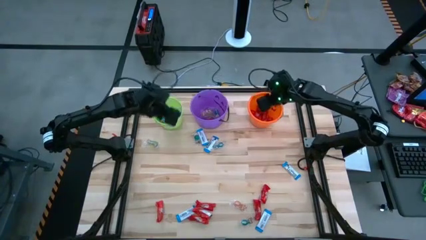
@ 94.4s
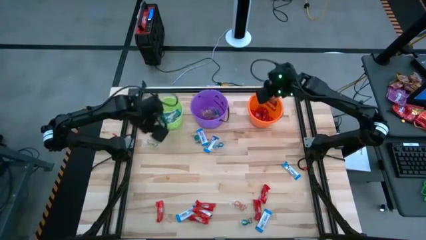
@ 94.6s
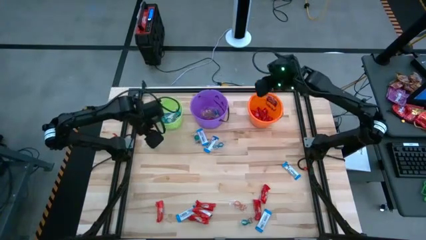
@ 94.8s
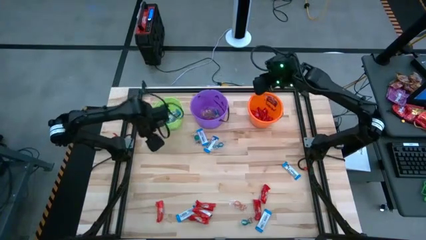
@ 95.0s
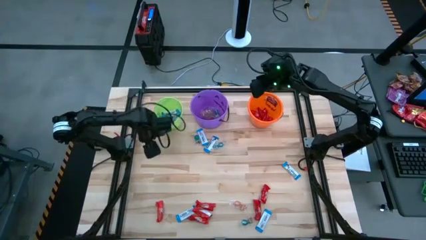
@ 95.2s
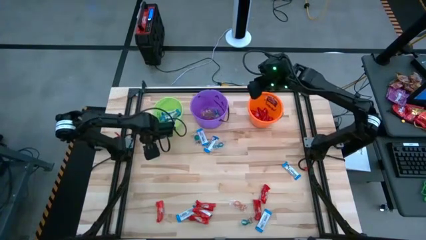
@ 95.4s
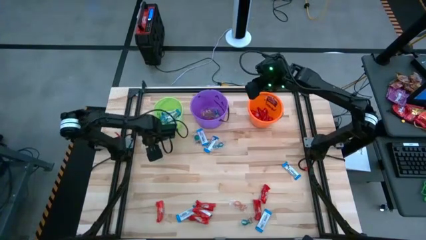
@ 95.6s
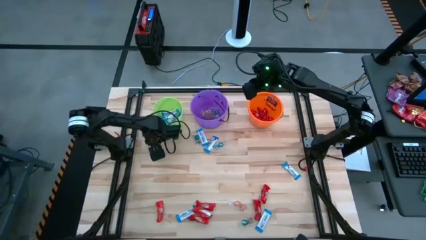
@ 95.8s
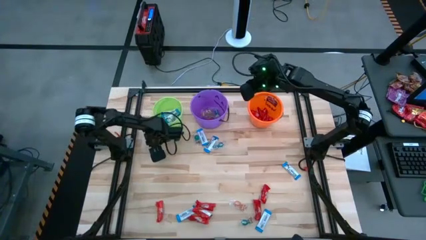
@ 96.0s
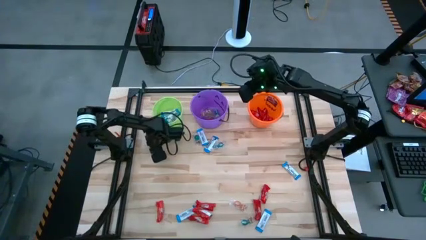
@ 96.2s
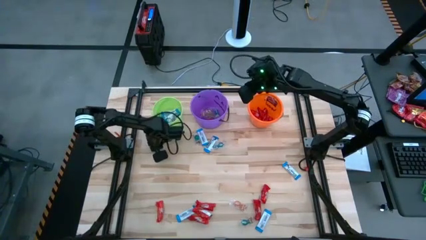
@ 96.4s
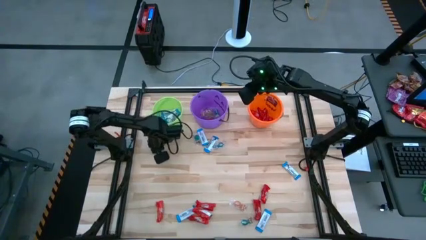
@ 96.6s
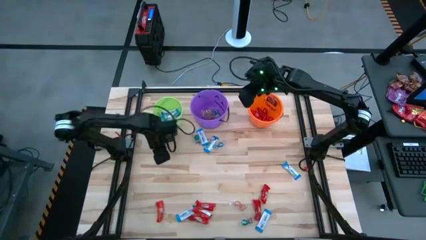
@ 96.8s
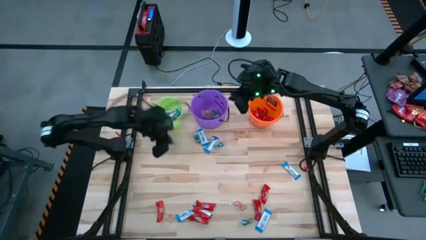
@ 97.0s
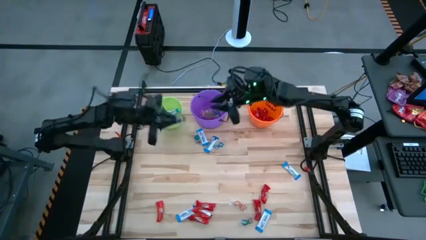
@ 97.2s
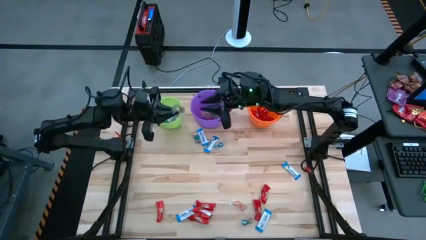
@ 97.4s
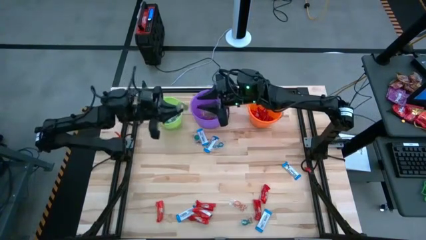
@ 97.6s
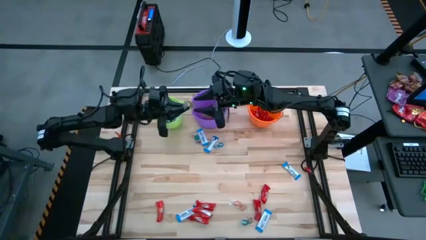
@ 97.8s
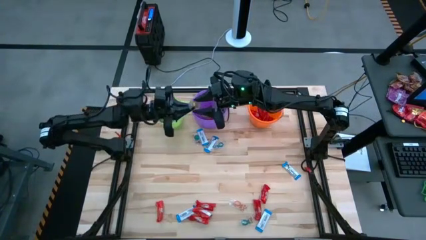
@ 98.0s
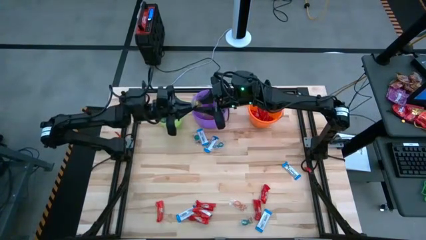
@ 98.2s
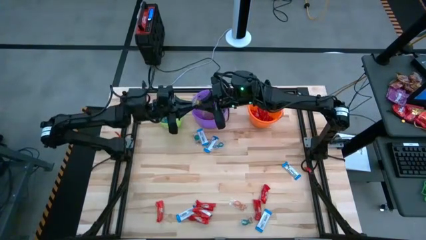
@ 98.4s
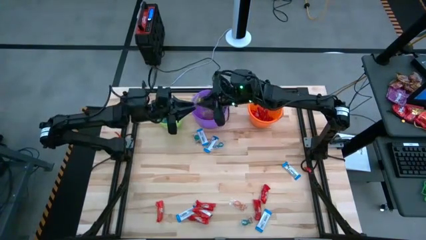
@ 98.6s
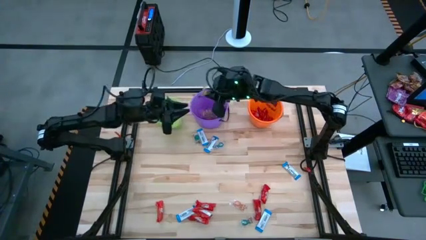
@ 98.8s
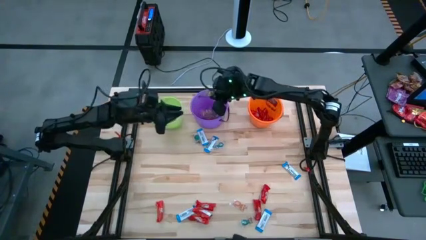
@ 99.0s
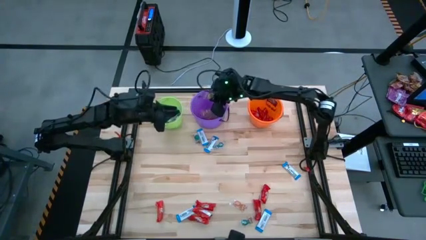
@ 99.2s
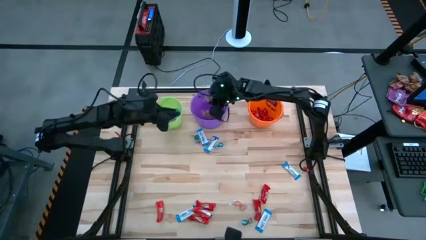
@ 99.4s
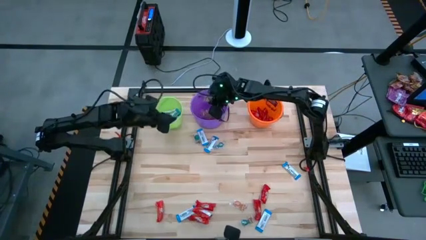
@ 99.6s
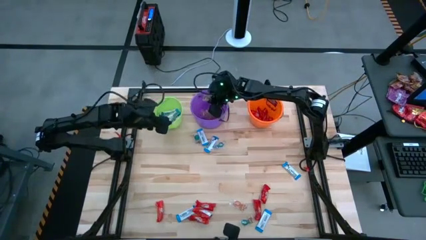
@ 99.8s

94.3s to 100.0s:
Task: Sort candy by brand, put in halloween buckets
Put the green gummy into the purple bucket

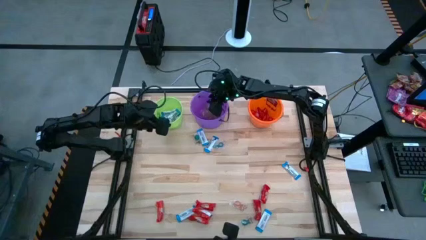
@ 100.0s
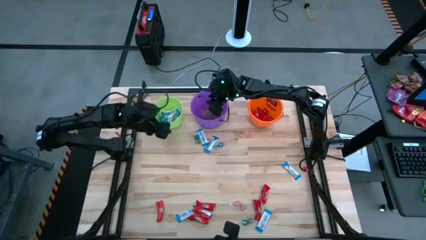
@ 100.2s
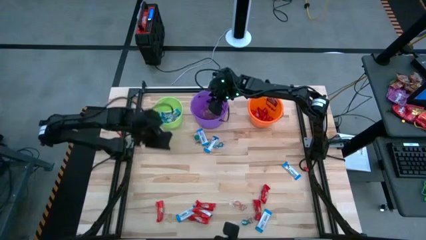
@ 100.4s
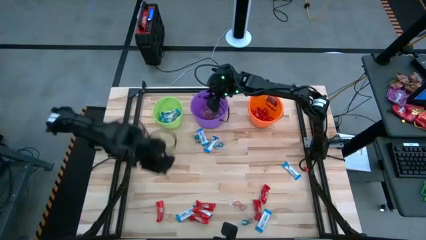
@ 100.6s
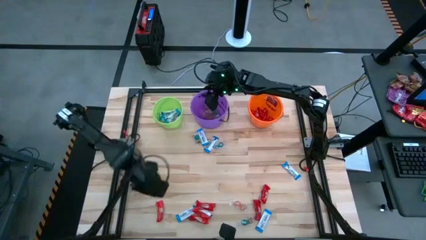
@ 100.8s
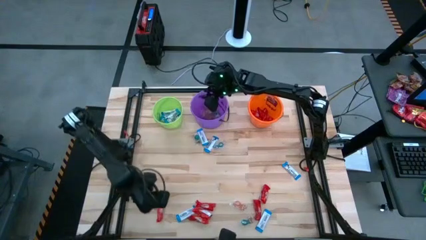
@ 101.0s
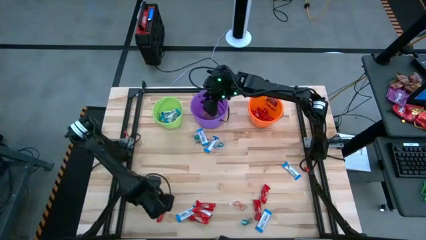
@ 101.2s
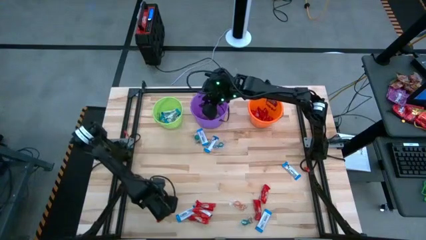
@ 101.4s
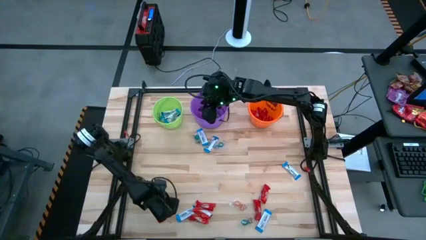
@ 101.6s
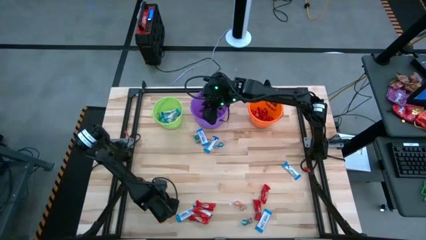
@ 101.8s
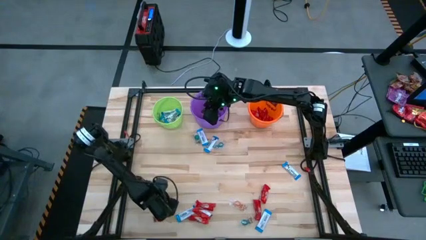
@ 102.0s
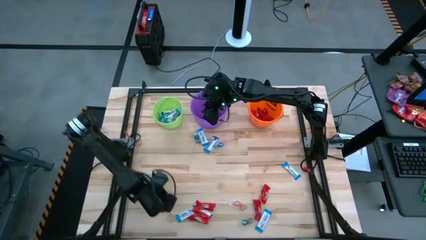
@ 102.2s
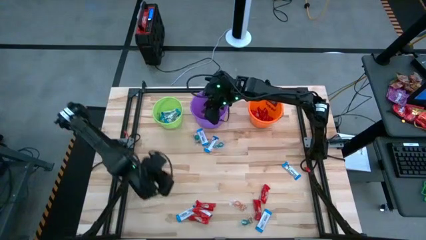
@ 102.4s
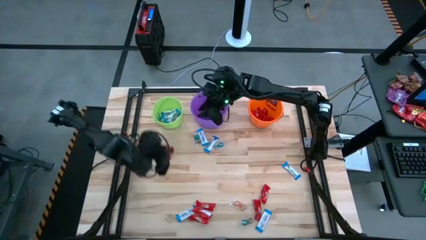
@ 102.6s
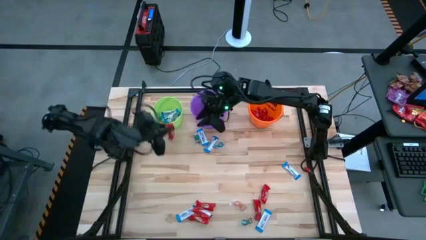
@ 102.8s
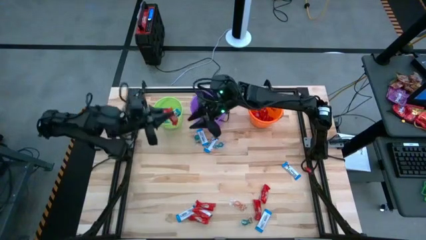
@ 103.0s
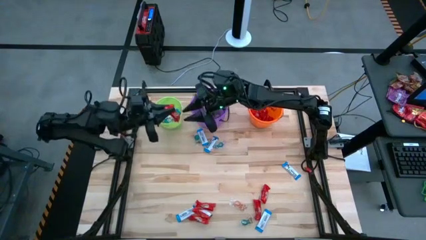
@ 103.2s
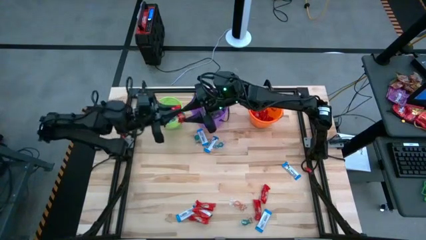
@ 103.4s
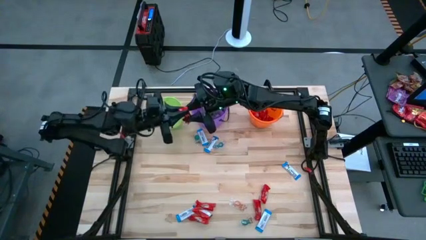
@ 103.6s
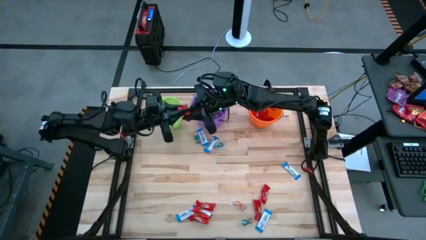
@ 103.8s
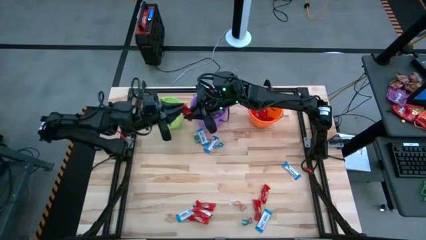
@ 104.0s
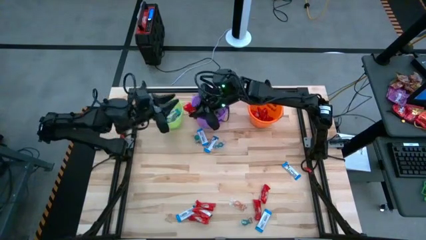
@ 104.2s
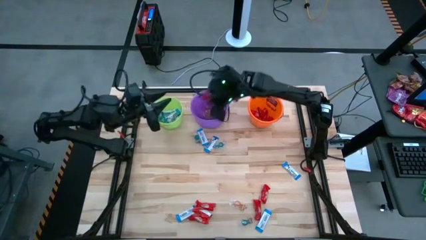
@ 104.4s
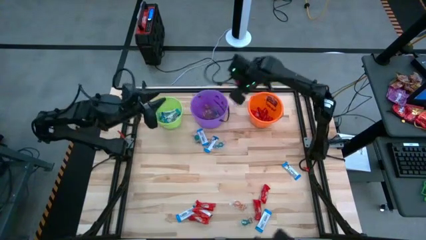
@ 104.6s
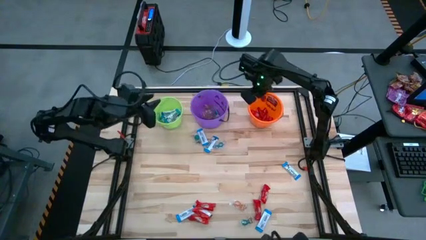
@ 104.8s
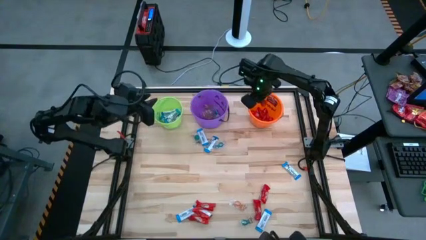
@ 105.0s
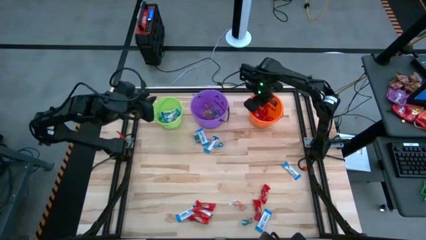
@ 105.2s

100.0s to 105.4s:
Put the red chocolate into the orange bucket

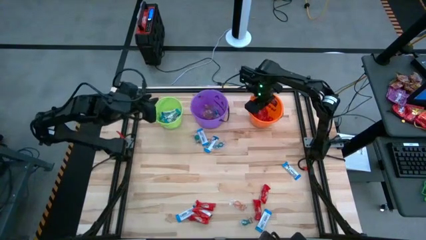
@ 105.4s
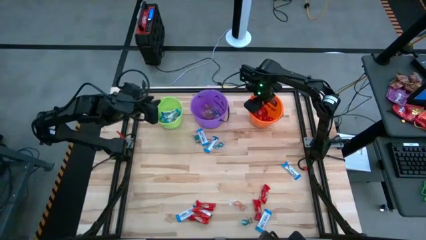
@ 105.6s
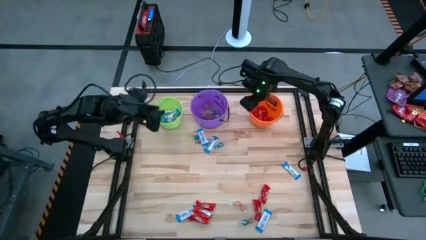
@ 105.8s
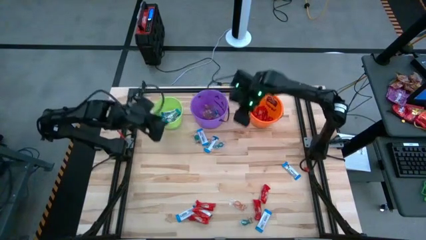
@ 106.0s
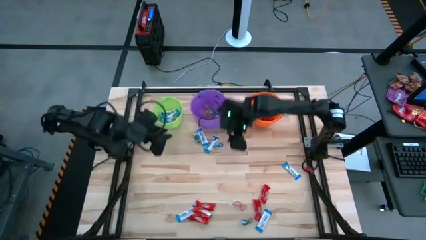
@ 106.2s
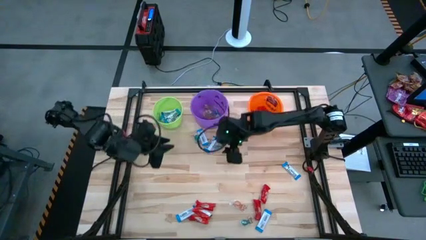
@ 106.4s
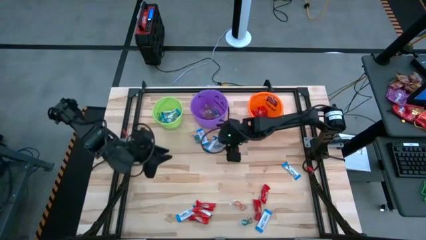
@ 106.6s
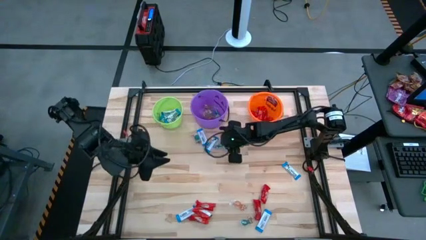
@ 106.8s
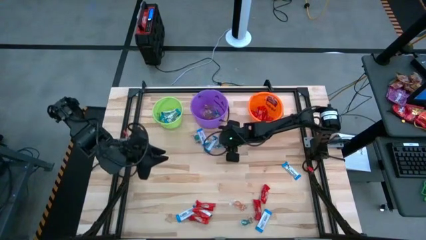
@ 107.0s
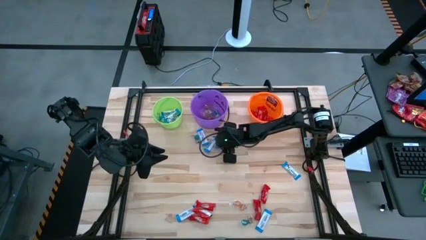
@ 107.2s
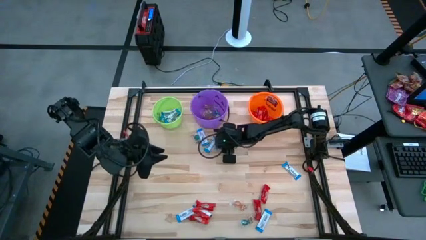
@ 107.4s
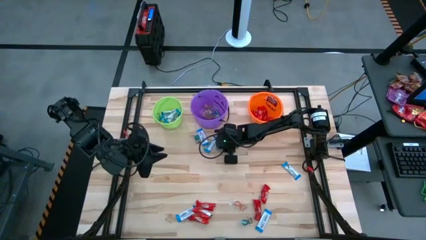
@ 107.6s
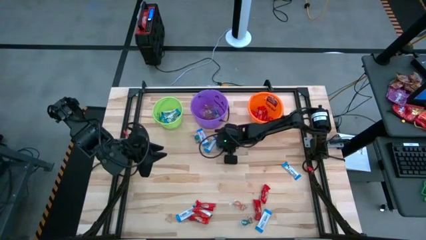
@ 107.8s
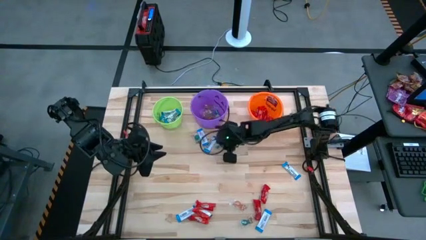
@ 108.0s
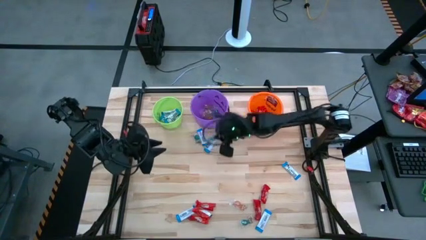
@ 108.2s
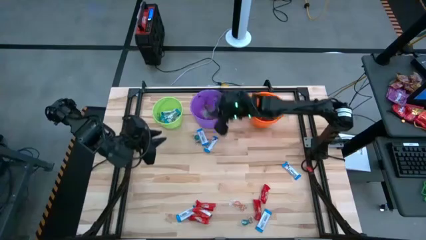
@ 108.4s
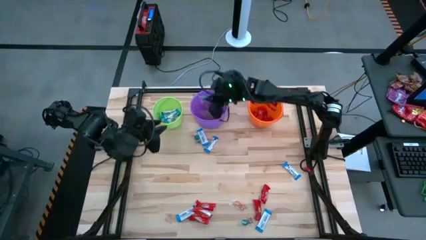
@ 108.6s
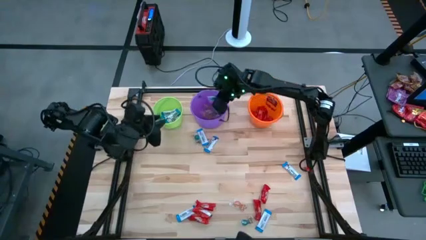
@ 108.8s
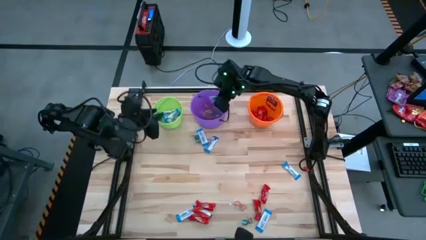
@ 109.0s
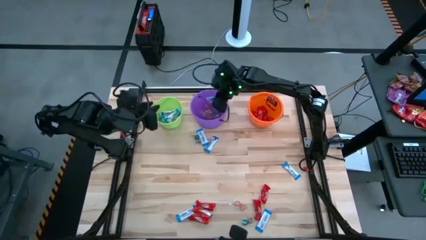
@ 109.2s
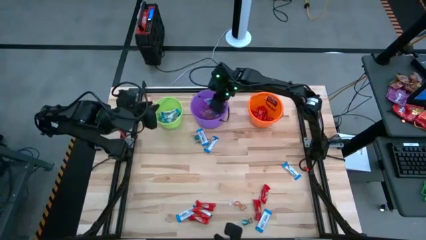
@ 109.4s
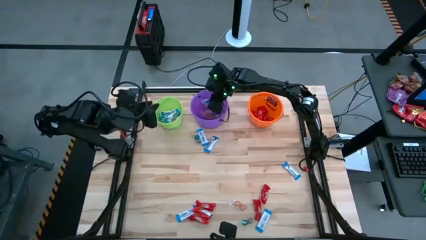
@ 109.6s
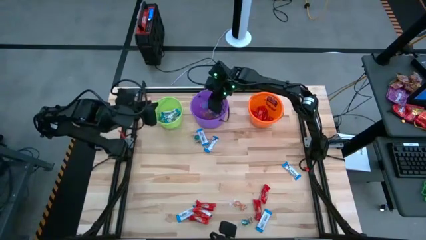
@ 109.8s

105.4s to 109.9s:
Put the blue gummy into the purple bucket
